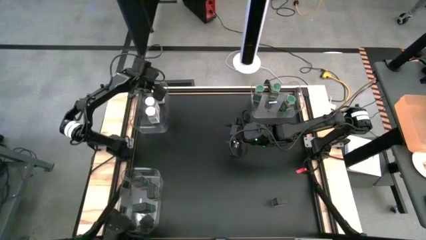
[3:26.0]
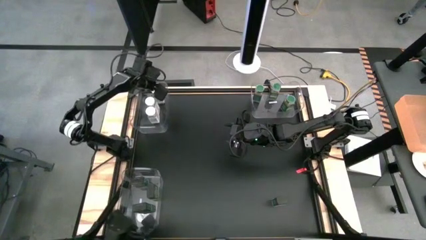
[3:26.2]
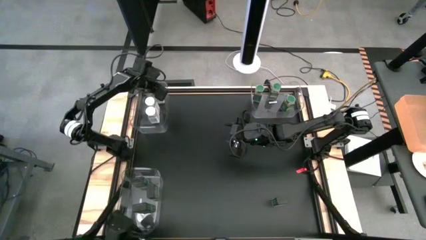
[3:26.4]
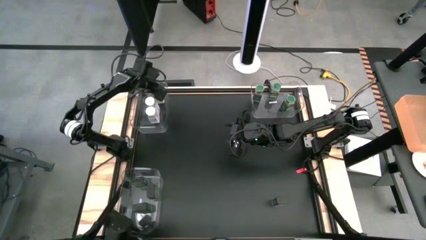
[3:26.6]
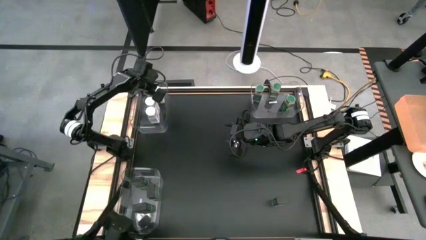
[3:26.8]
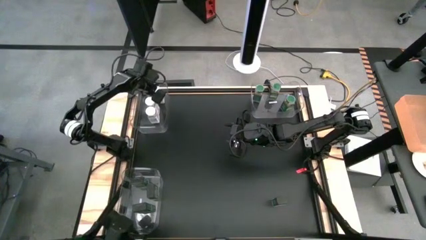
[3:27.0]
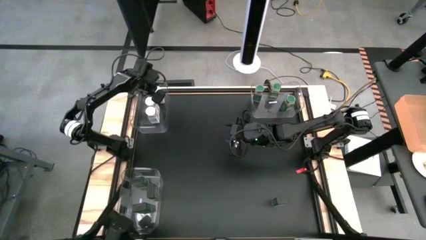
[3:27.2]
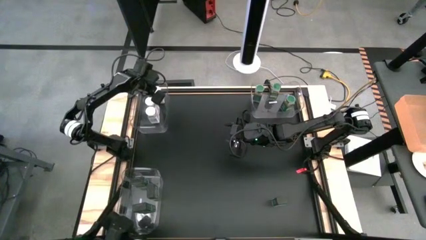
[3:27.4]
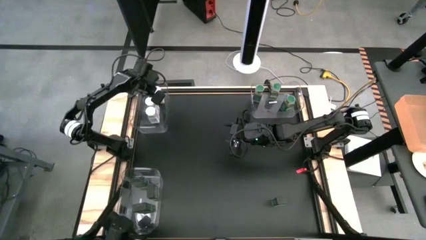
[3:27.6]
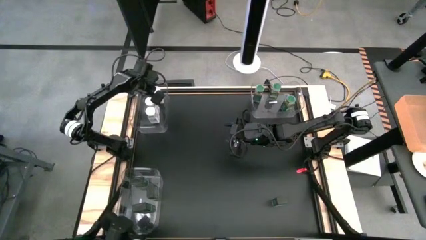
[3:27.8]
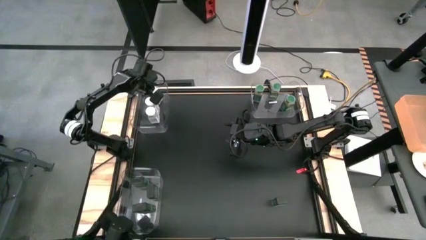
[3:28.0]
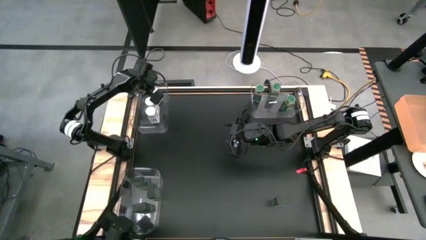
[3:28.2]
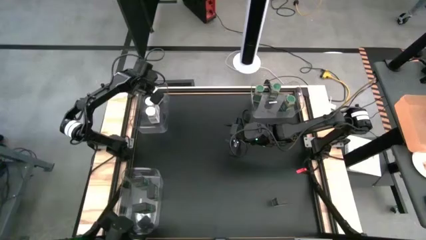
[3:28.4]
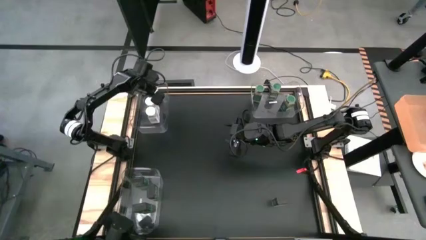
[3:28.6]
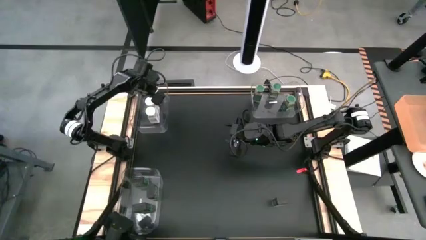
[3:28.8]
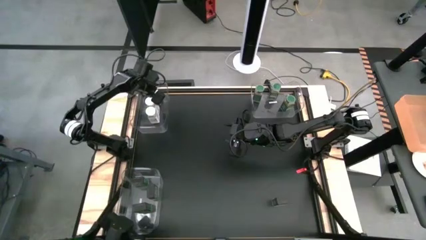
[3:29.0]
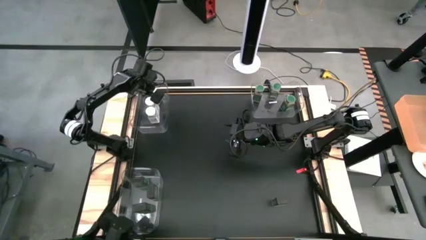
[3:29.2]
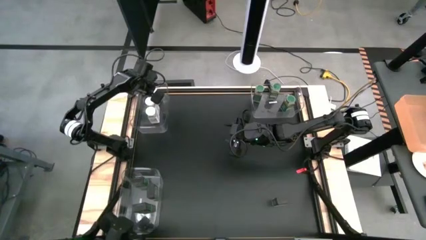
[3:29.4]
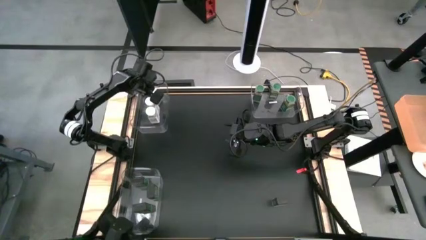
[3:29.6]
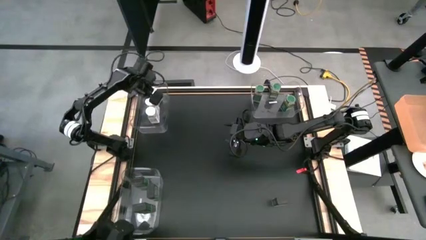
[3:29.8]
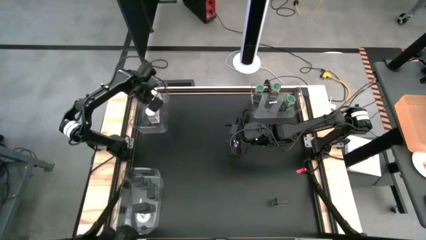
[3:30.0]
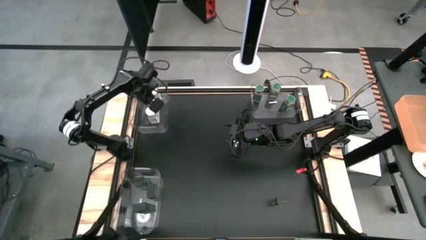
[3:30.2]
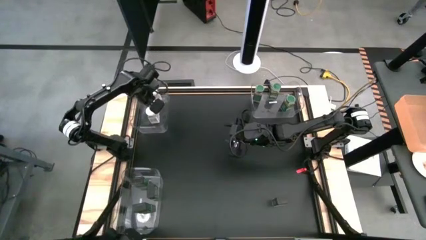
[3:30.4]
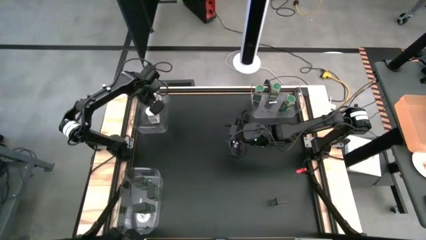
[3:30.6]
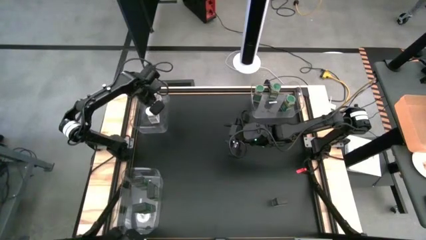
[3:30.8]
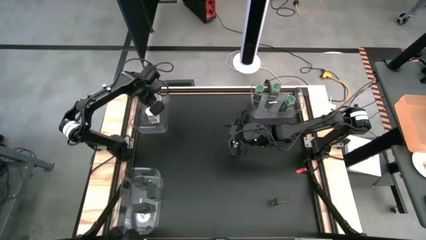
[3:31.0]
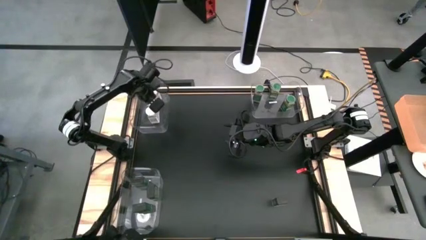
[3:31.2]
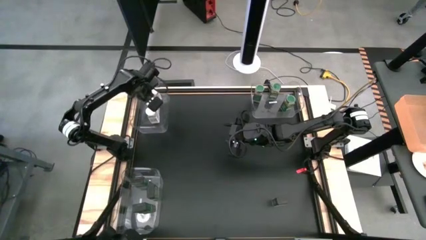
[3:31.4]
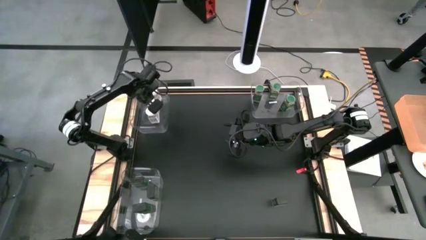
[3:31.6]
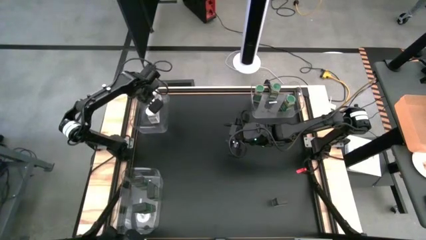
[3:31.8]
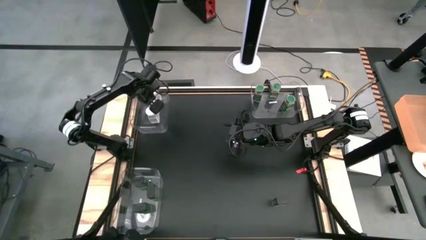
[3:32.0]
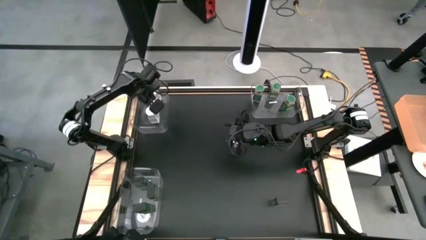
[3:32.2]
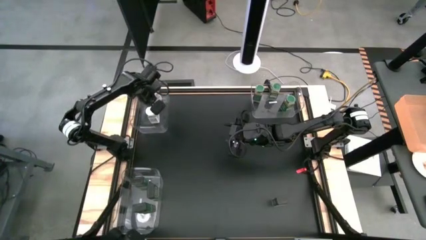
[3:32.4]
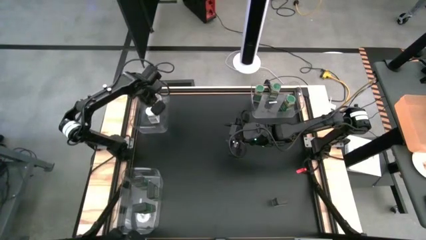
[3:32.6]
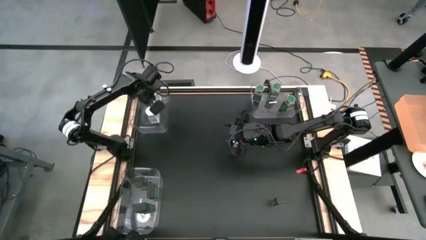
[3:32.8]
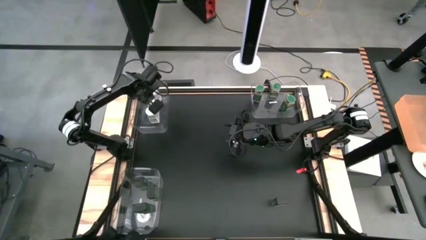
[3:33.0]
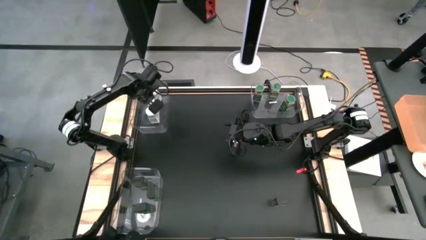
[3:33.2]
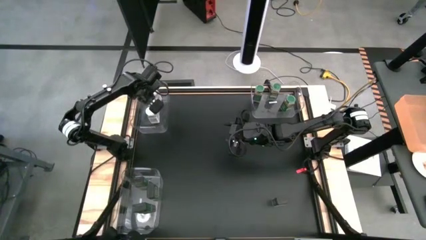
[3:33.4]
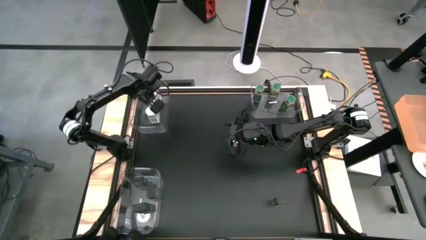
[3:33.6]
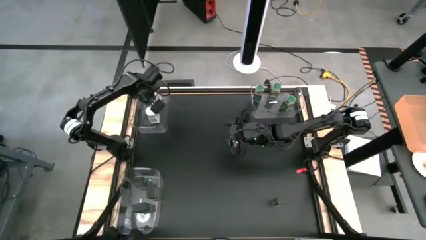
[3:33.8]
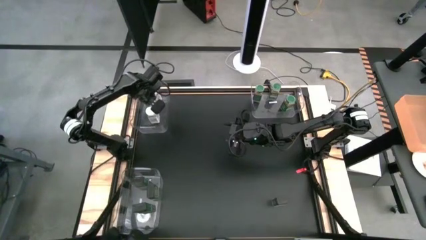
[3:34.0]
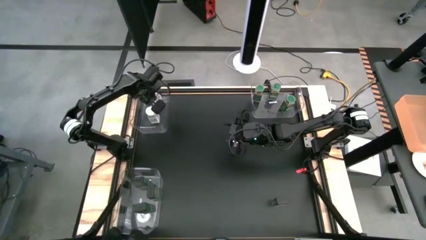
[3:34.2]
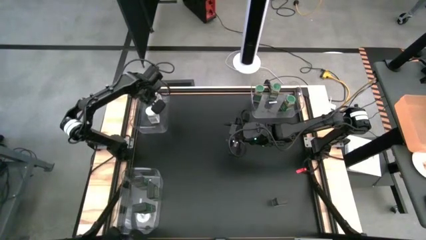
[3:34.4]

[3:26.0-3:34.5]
Task: Sort spices by type
Adjust the white seasoning bottles in the top left transparent bin

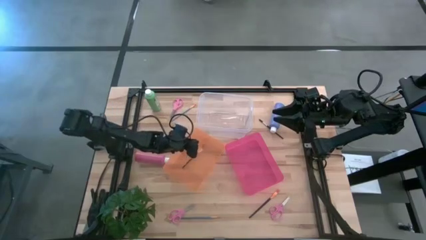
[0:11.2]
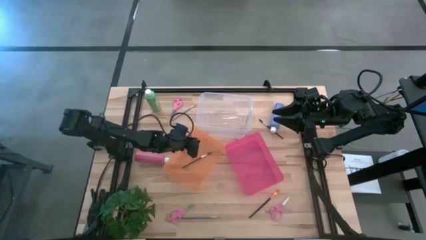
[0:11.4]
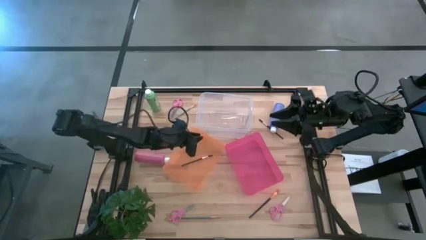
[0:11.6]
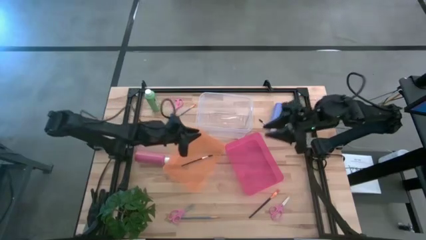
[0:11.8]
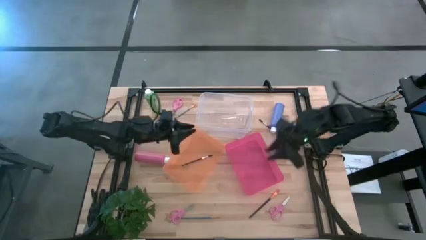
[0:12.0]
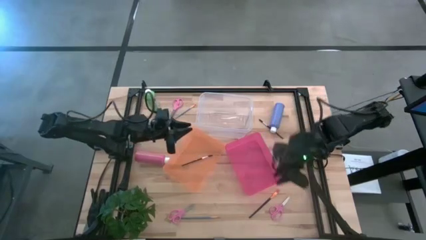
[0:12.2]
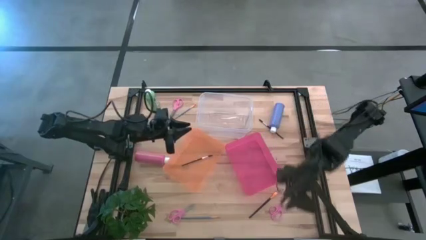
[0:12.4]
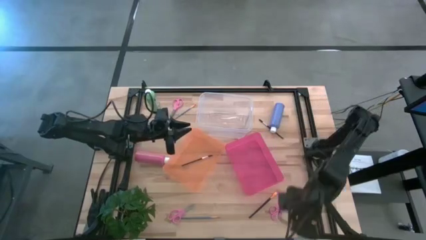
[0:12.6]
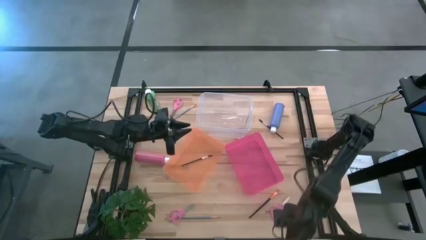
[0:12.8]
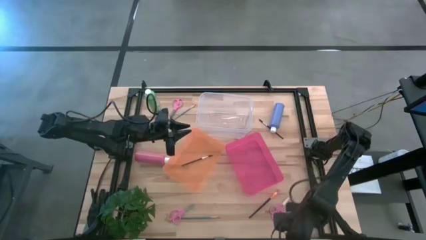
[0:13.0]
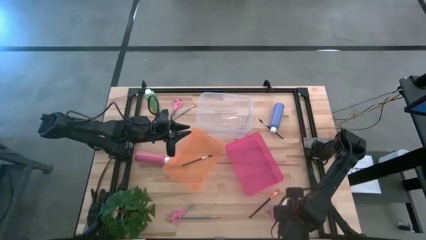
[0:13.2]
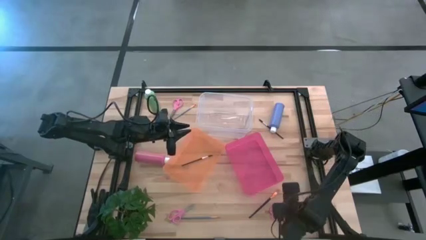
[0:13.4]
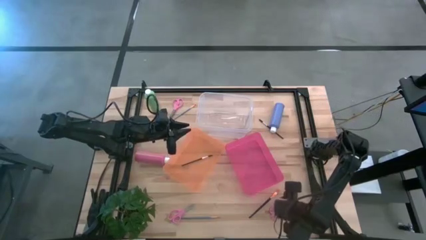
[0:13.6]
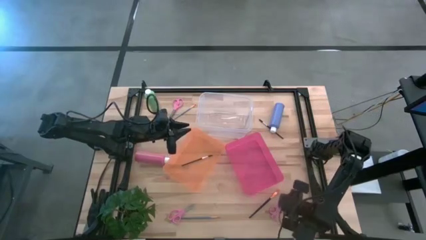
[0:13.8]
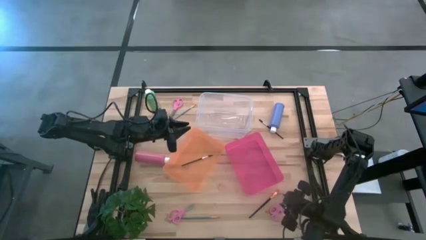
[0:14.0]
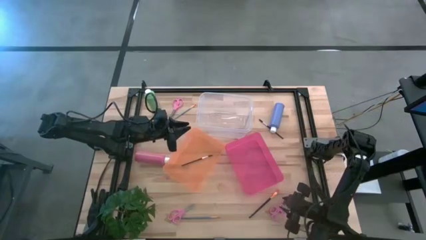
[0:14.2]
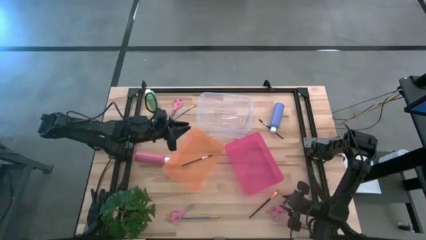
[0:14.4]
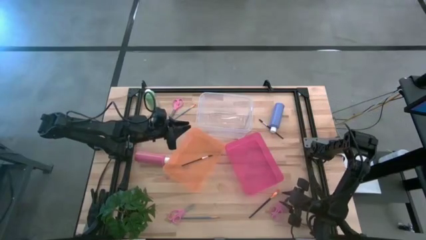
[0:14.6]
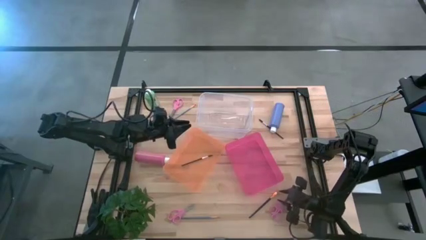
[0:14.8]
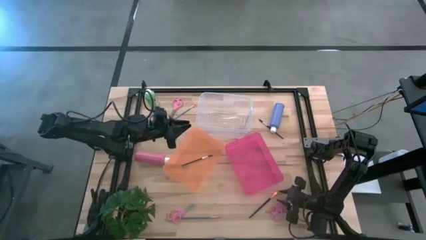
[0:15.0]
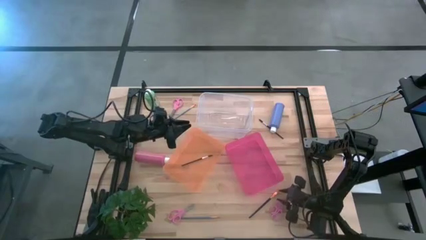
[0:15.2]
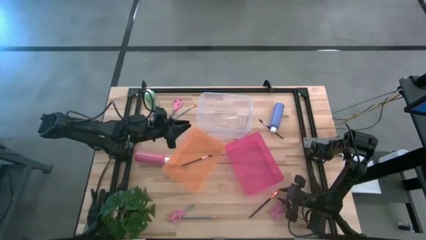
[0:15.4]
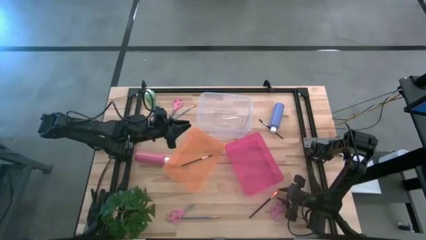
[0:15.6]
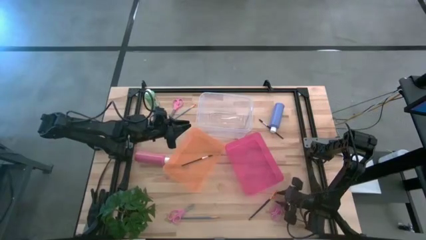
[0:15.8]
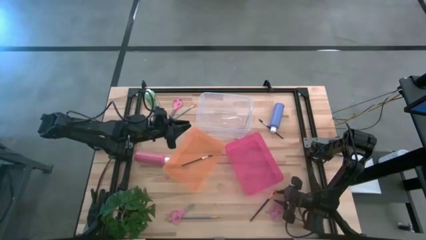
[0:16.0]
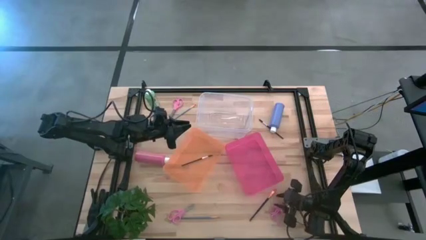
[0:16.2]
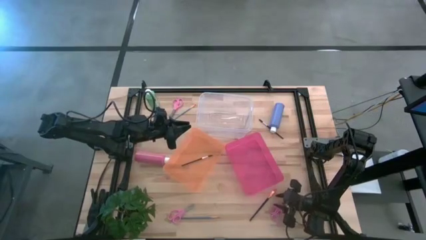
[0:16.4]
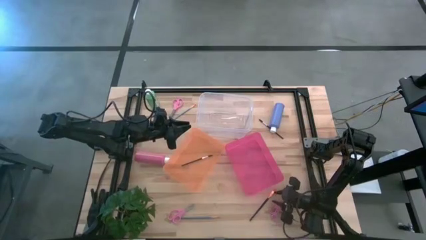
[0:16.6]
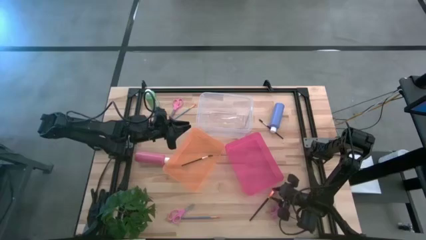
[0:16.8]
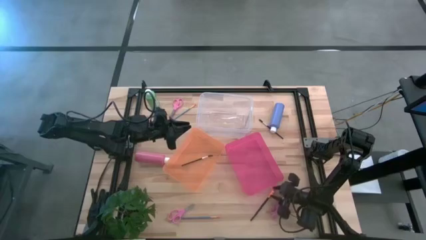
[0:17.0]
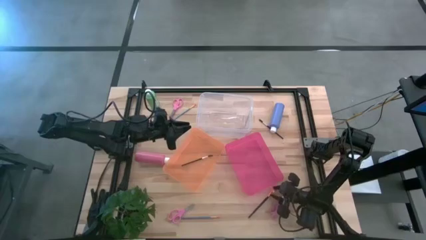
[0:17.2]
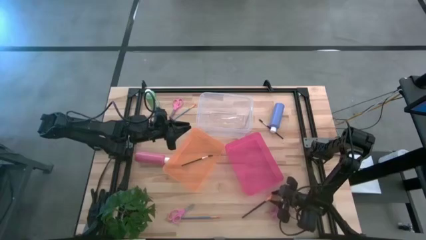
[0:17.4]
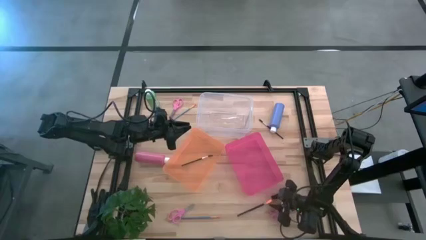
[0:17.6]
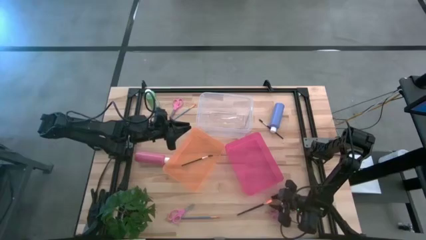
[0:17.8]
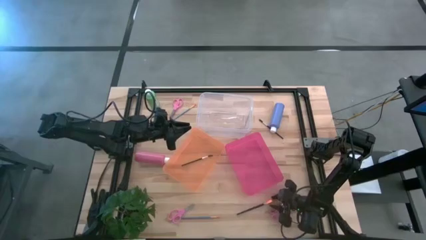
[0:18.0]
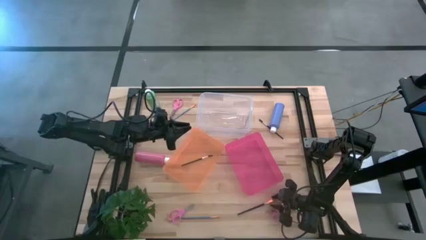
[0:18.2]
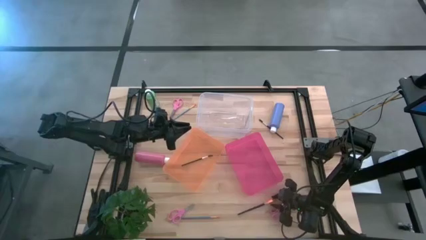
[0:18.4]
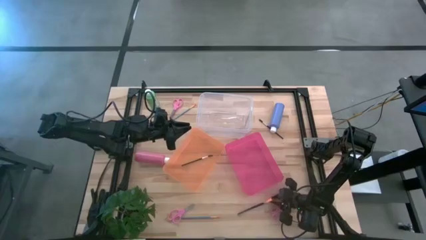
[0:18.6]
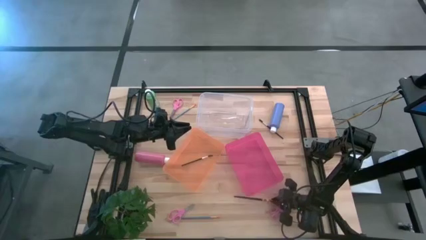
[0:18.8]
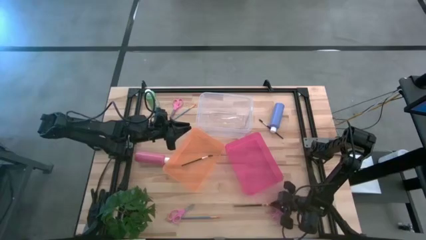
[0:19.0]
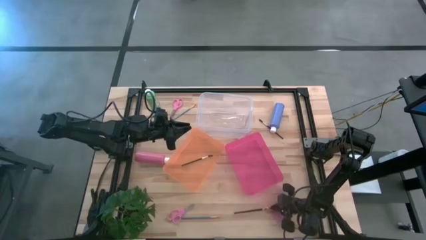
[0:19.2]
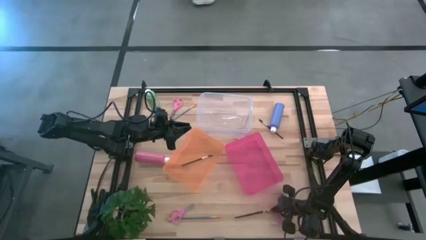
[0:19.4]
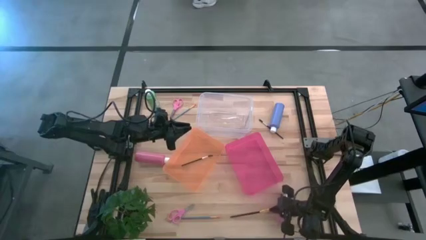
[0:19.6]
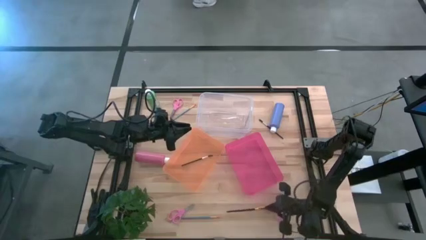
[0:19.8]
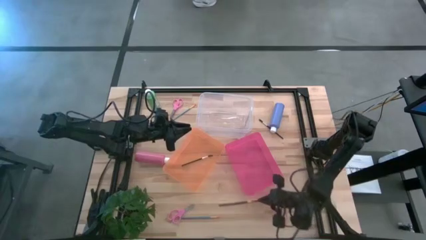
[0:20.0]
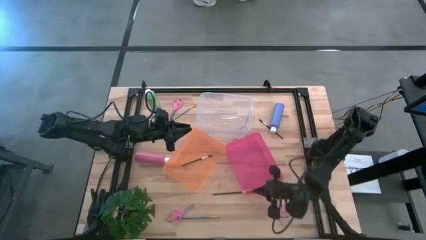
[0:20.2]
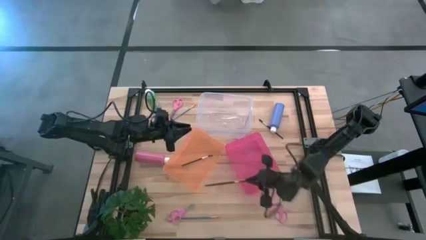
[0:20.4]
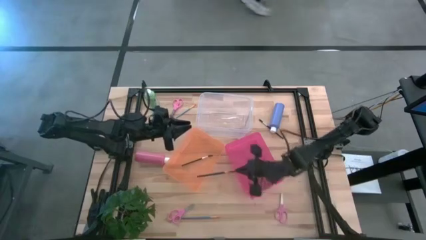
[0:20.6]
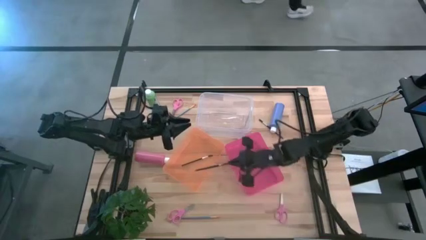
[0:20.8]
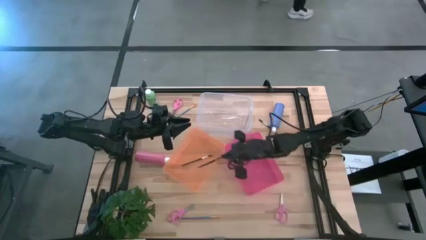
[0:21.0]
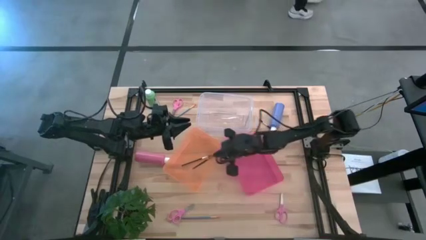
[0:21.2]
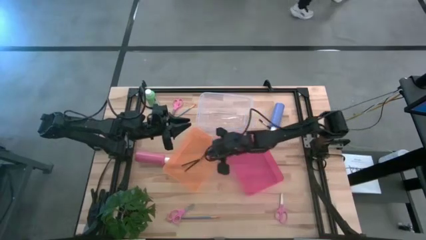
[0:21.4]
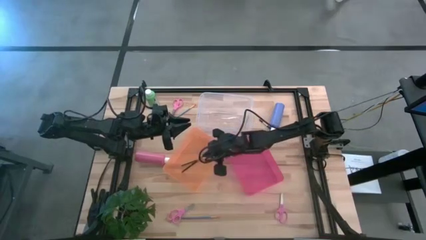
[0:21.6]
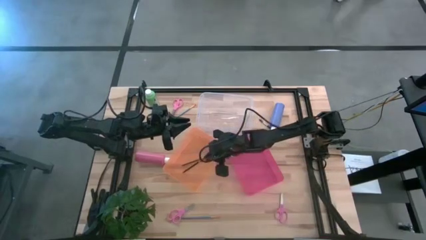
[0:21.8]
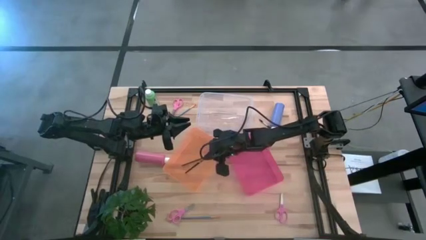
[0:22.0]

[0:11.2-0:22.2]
Task: Pick & Place Paint Supplies
Put the black paint brush into the orange bin
